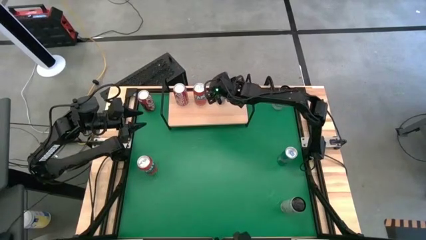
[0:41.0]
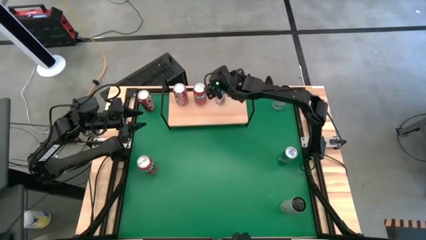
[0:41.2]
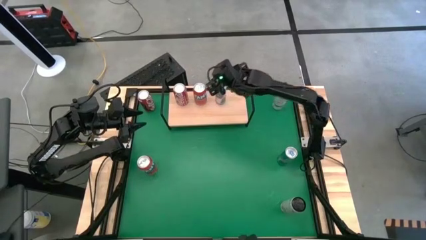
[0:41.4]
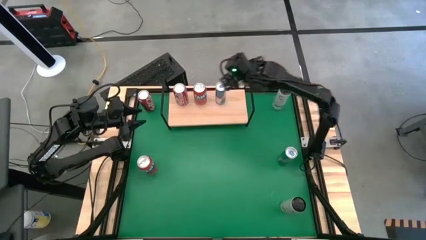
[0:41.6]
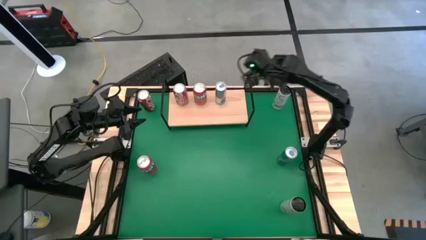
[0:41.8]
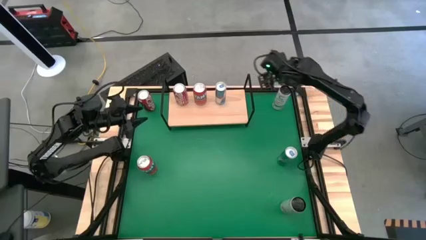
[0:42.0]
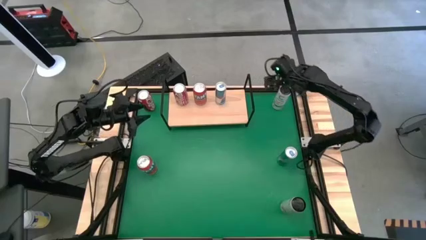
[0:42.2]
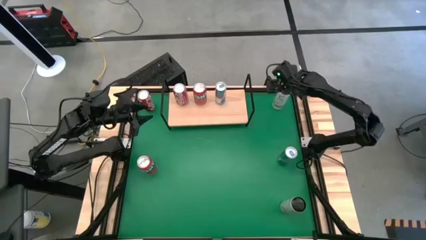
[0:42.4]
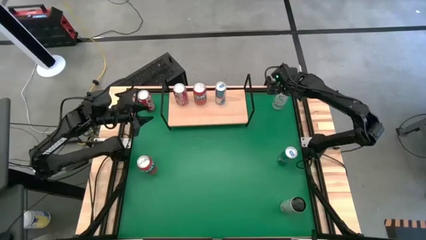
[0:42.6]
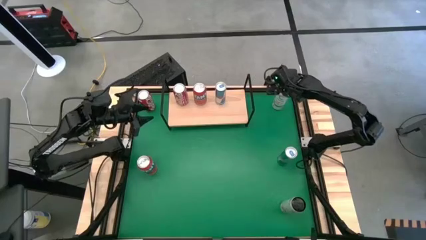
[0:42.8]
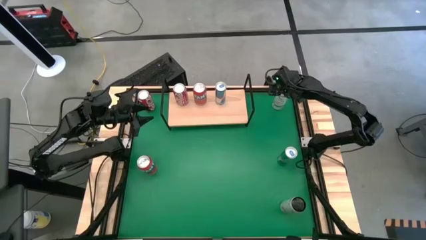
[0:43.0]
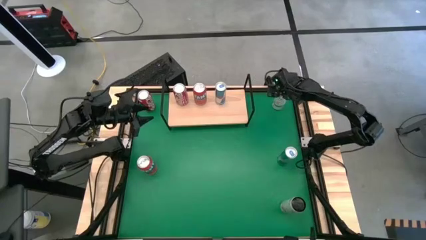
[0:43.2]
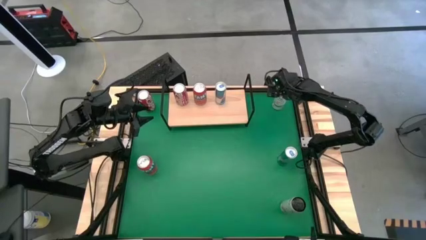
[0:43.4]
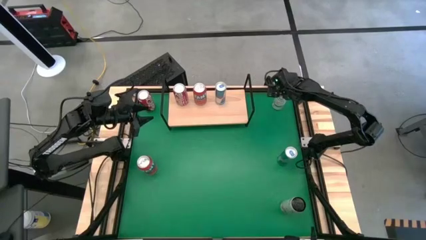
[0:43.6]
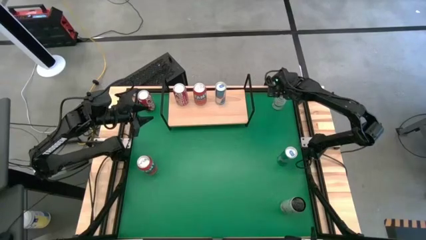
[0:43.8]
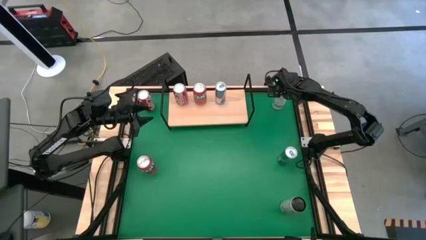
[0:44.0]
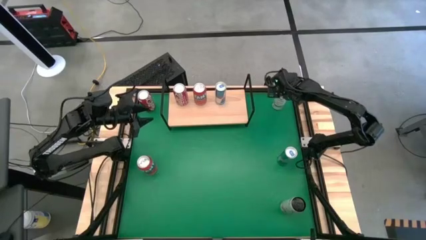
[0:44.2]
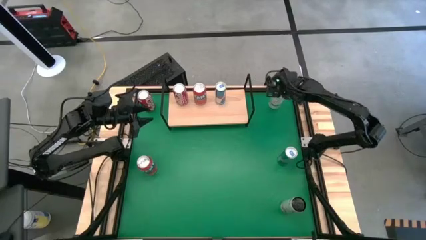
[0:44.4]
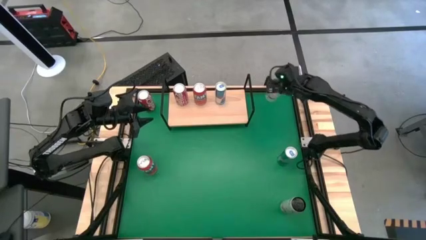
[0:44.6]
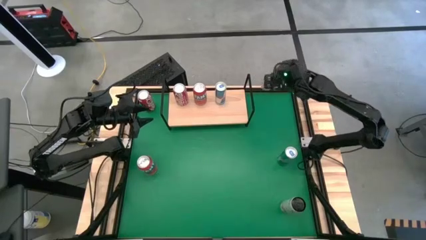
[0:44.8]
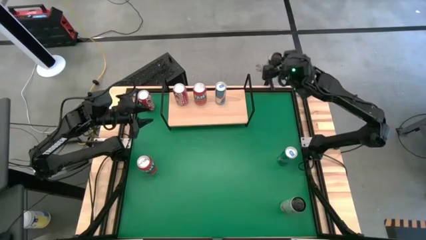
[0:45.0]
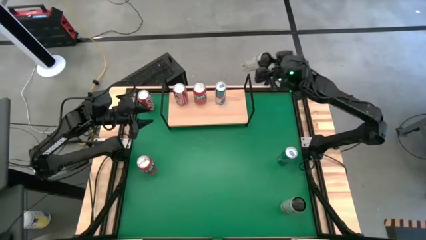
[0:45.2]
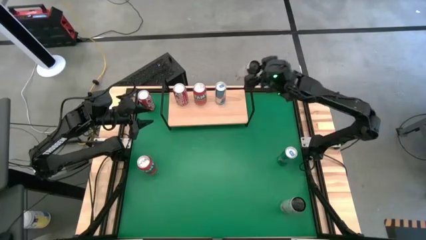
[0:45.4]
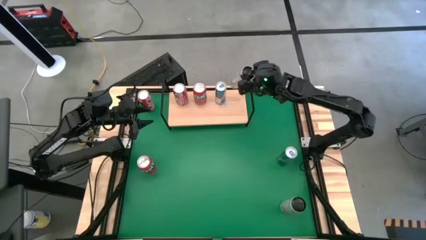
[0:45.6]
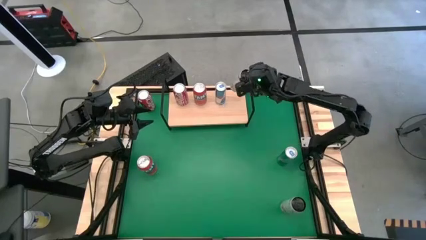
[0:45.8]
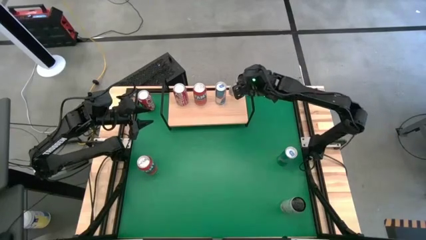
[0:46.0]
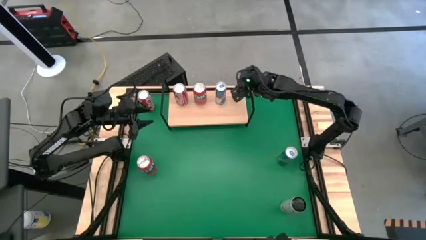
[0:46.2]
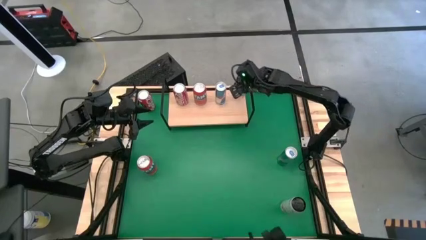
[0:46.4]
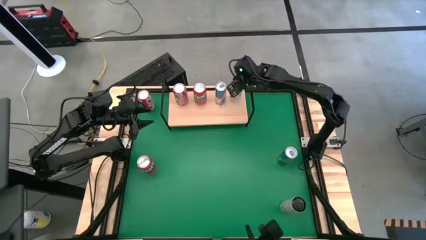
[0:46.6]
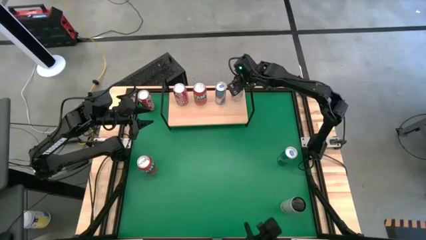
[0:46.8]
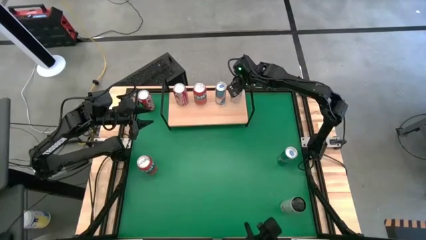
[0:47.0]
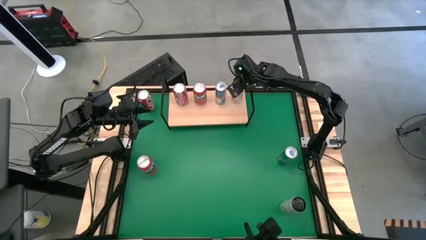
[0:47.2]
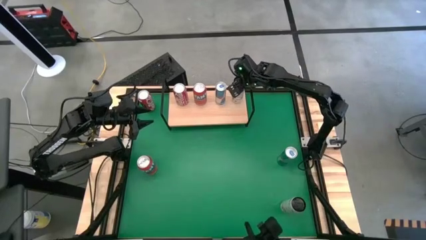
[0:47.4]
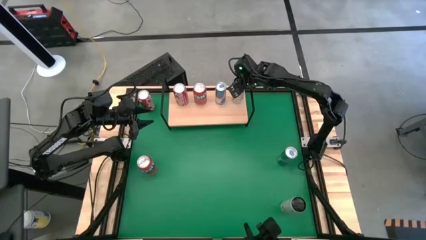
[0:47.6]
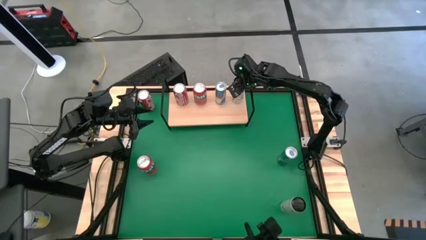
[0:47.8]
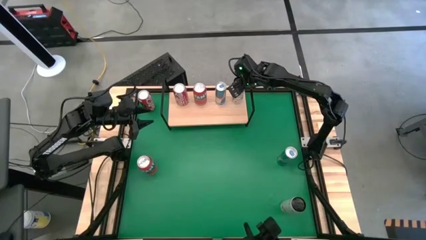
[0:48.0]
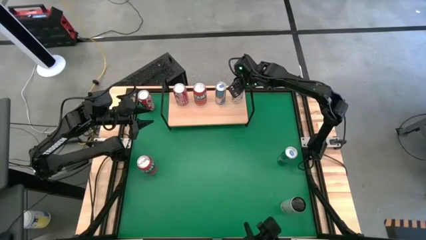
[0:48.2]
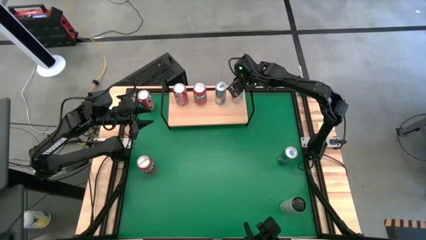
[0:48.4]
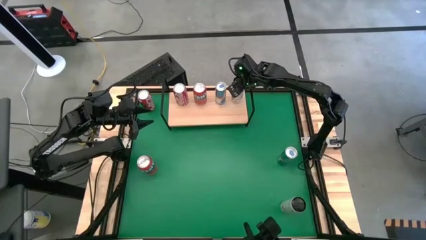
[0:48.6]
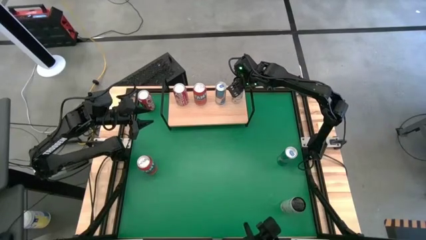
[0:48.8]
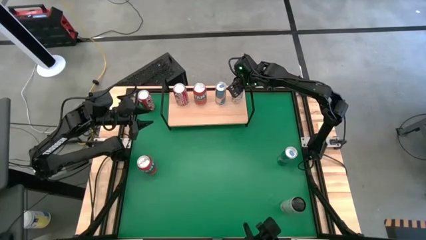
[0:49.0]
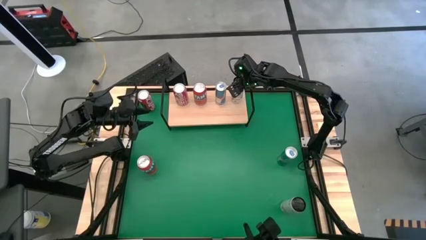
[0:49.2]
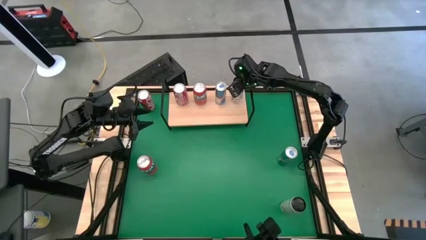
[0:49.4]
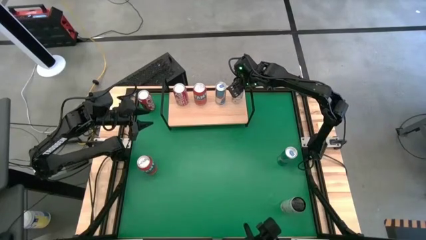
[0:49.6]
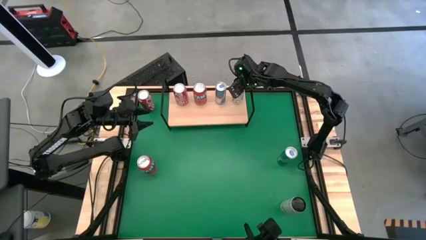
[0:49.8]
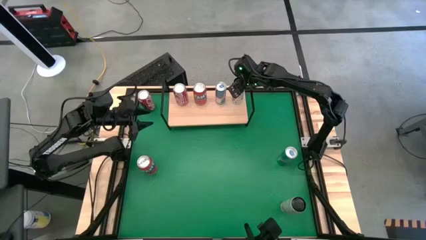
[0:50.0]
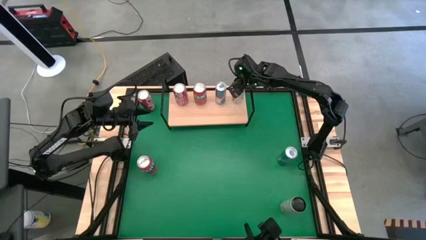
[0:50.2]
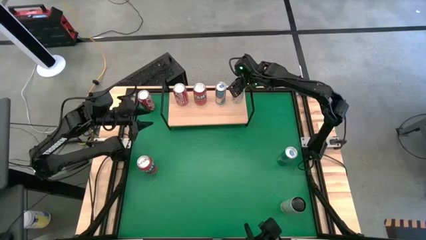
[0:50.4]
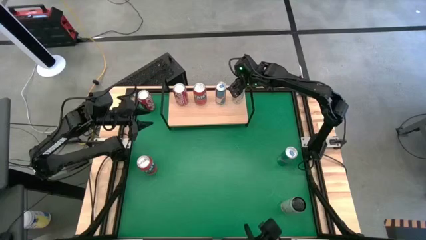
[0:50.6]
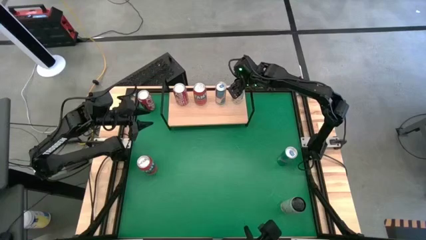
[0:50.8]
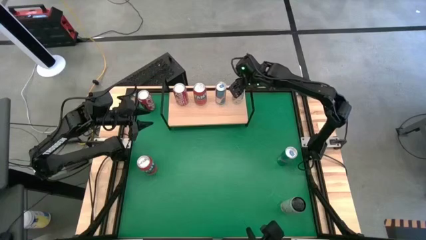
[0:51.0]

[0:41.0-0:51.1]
Task: Place canned beverage on shelf
Put the top white-yellow soda can on the shelf

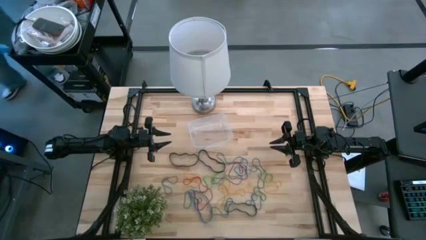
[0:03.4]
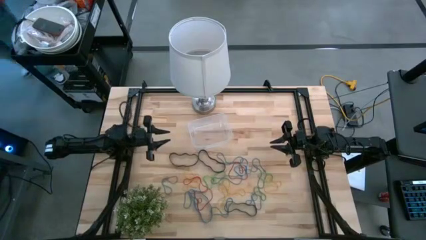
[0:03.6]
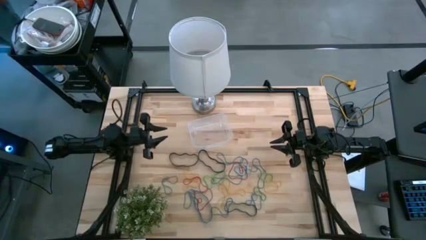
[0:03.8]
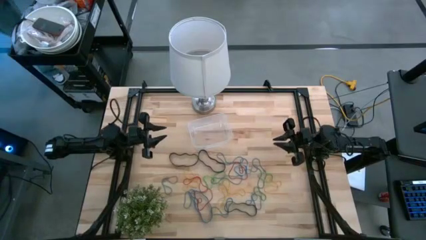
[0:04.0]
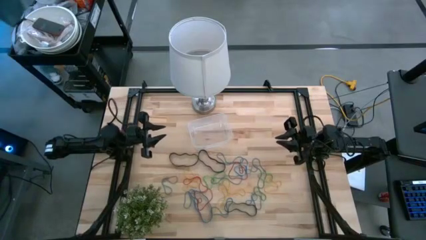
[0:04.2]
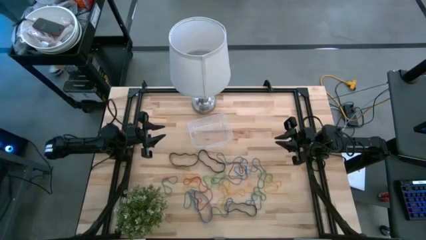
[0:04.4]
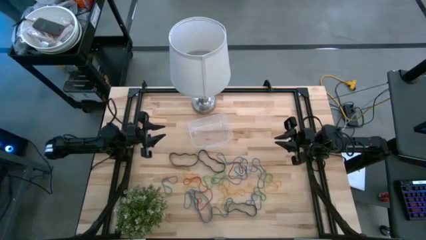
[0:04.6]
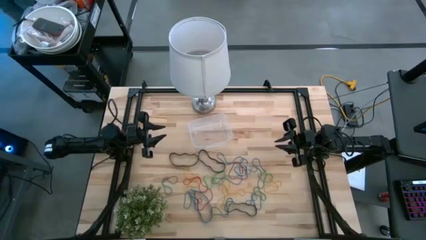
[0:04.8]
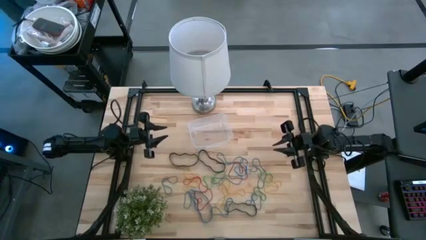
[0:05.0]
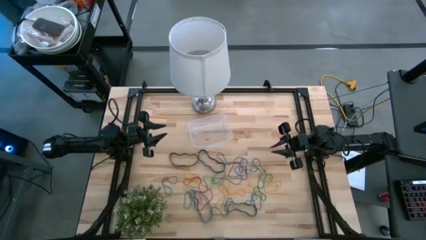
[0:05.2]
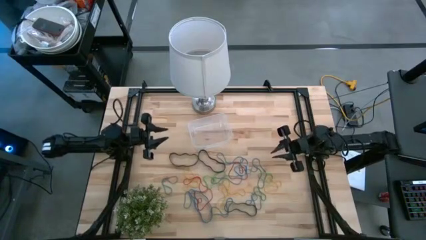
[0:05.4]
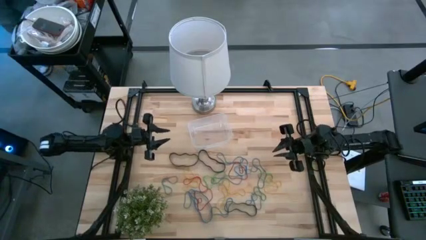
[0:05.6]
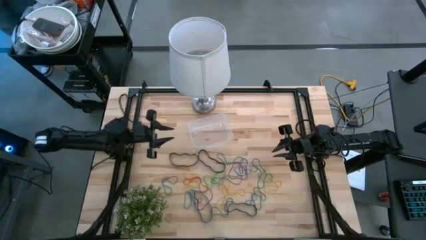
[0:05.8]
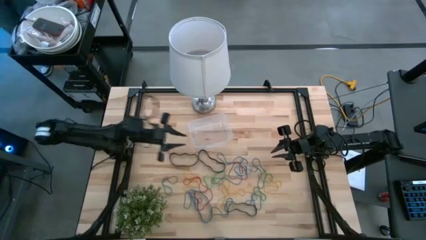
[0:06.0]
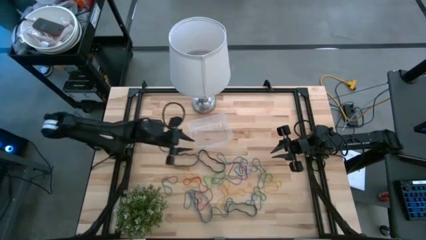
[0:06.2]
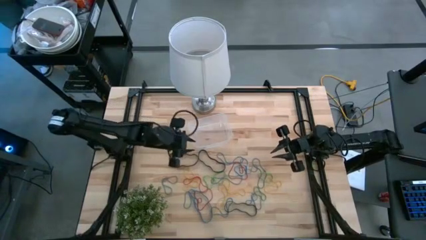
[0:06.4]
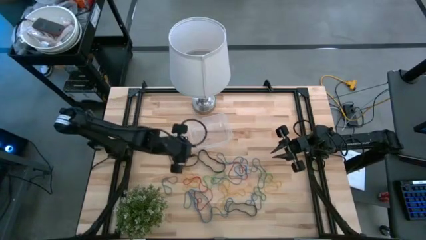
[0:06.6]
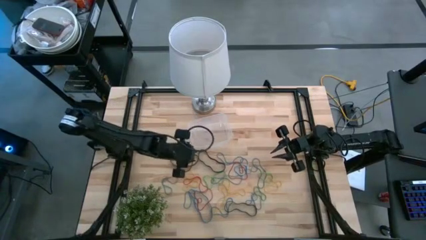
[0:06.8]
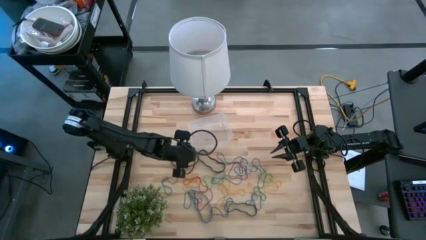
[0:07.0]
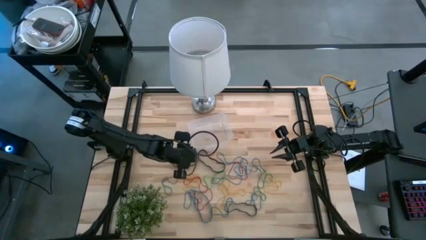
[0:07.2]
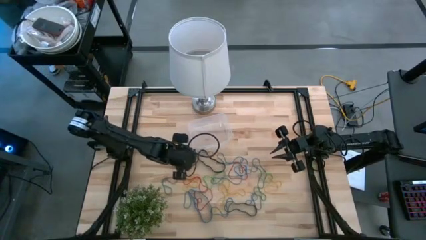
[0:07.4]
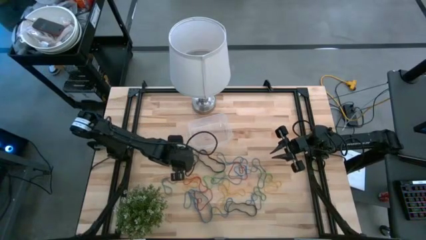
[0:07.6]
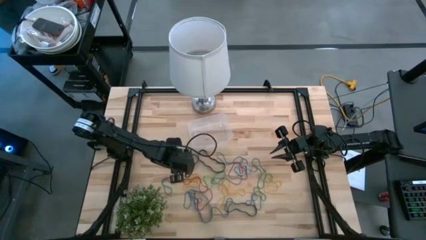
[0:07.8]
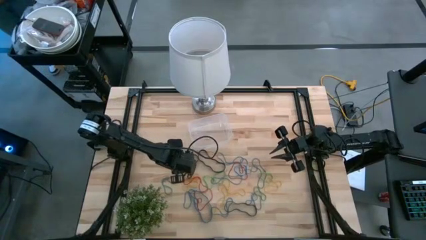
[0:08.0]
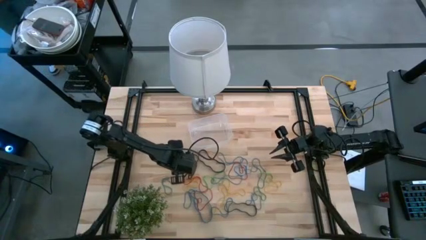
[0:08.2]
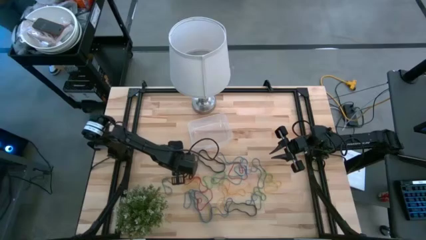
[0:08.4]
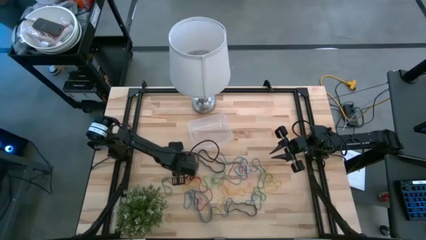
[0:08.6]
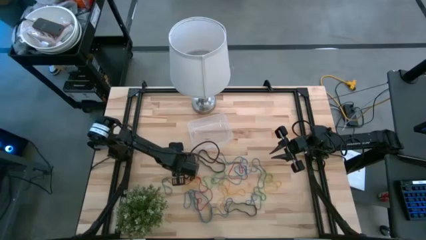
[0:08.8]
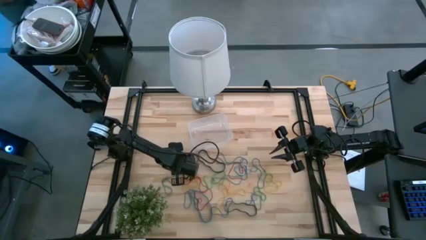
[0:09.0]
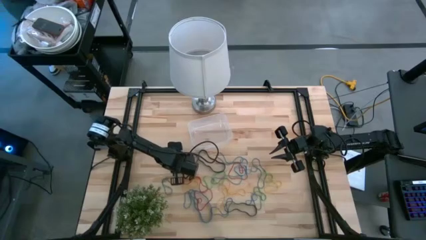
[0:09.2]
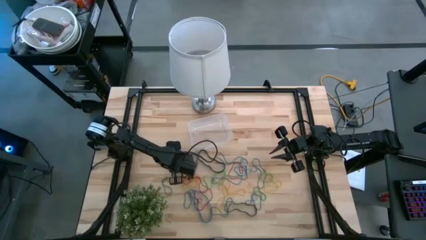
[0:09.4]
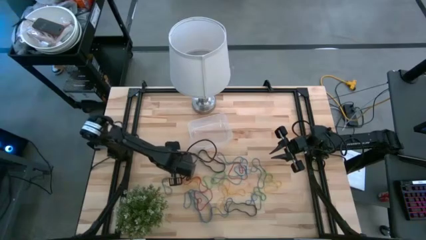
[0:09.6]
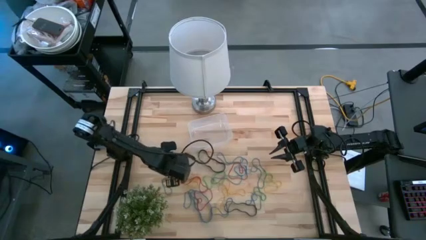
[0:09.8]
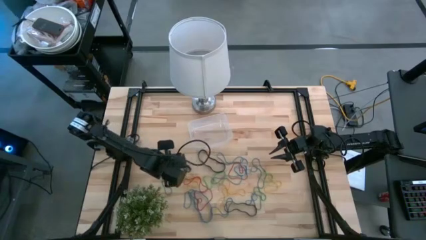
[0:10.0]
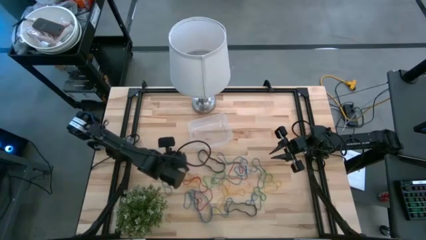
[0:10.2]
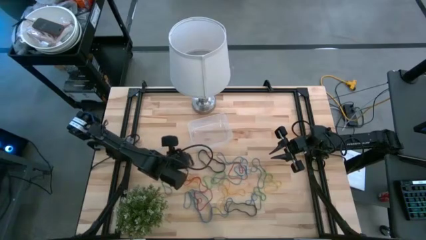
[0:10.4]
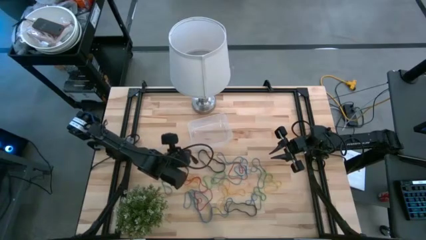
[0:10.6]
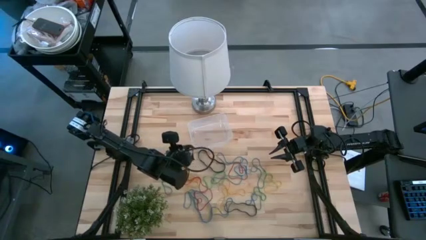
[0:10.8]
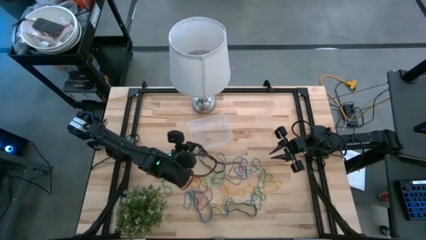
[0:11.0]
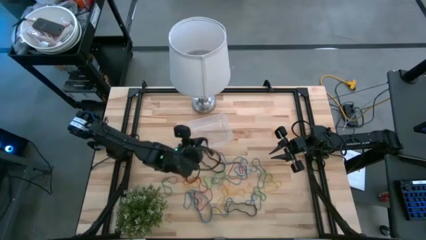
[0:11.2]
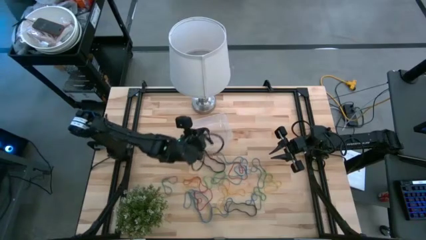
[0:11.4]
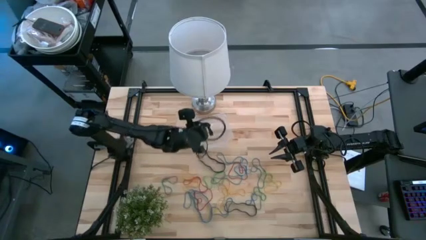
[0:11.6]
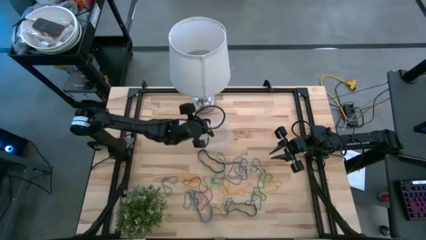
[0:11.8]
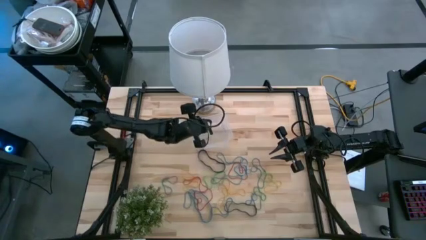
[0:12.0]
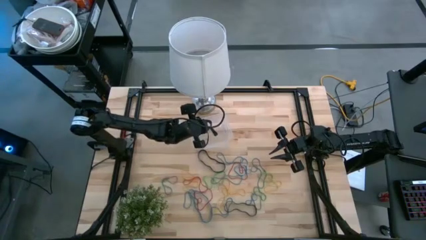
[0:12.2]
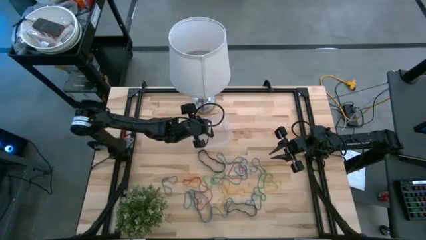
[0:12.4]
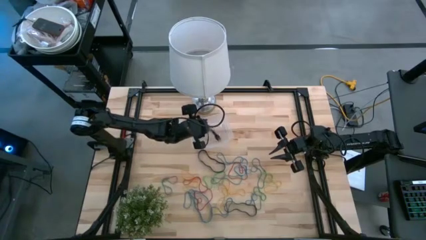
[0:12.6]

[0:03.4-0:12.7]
Task: Pick and place rubber bands into bin
Put the black rubber band into the transparent container
